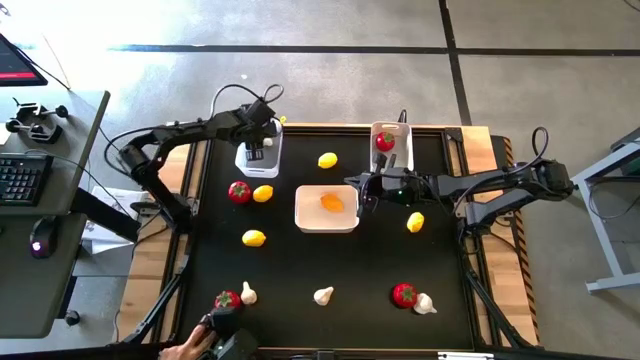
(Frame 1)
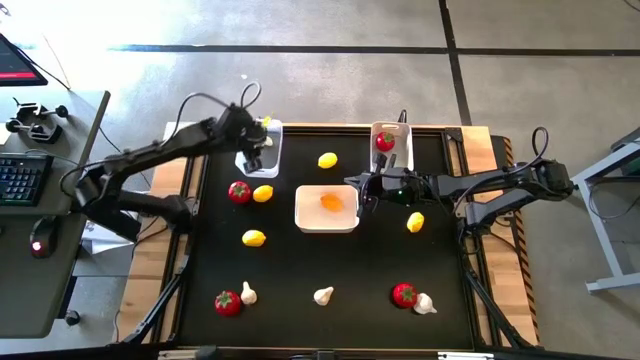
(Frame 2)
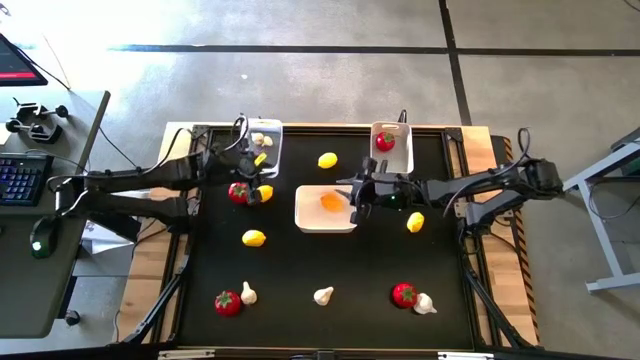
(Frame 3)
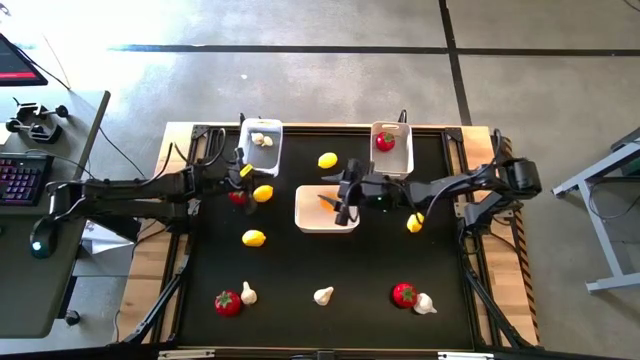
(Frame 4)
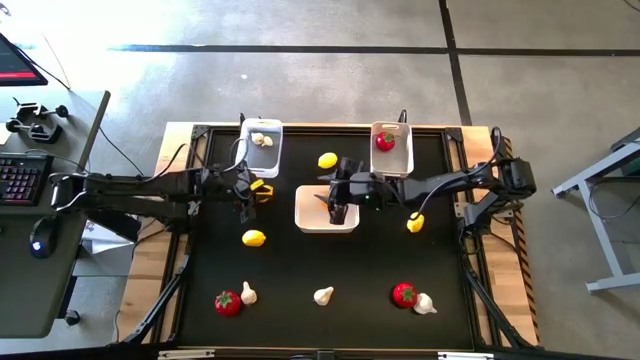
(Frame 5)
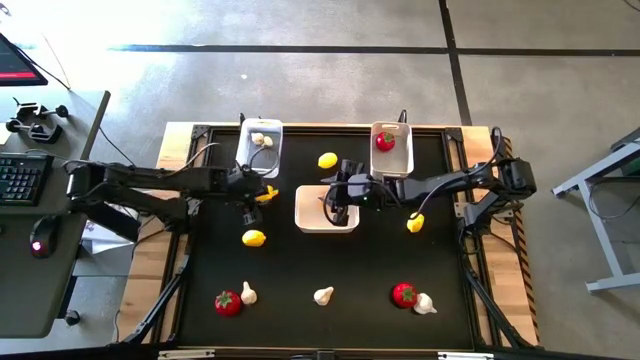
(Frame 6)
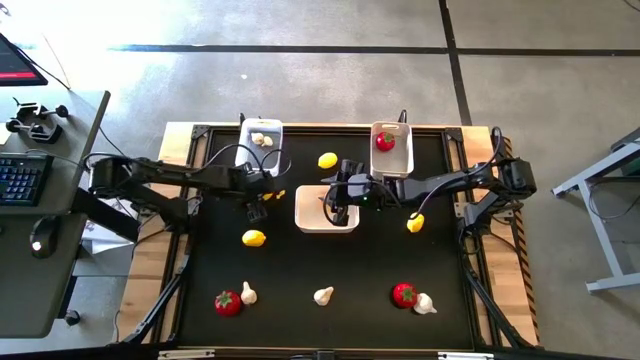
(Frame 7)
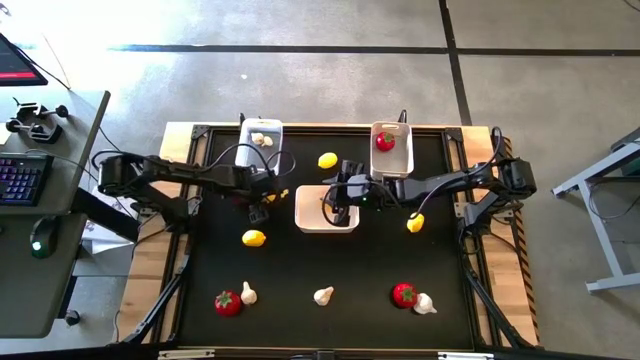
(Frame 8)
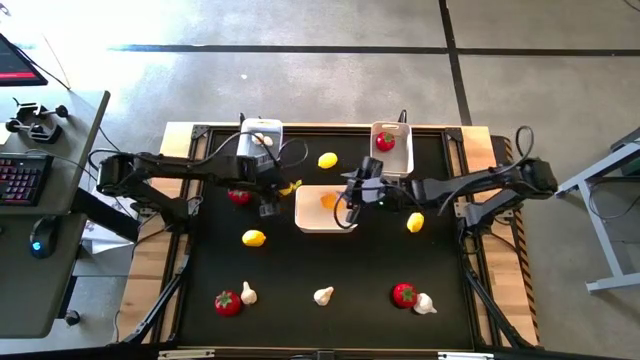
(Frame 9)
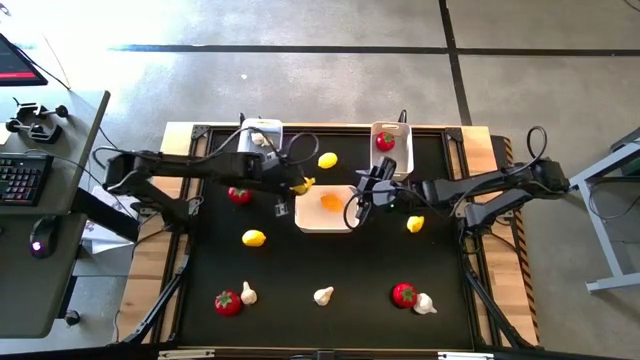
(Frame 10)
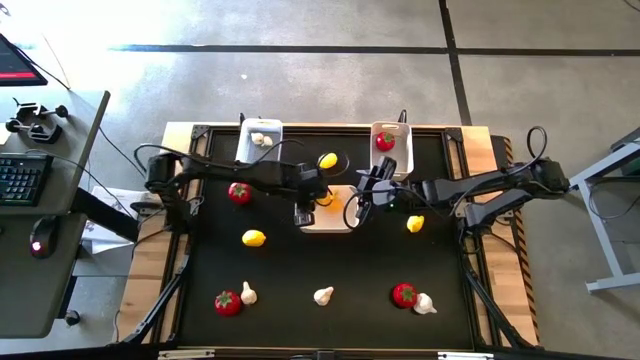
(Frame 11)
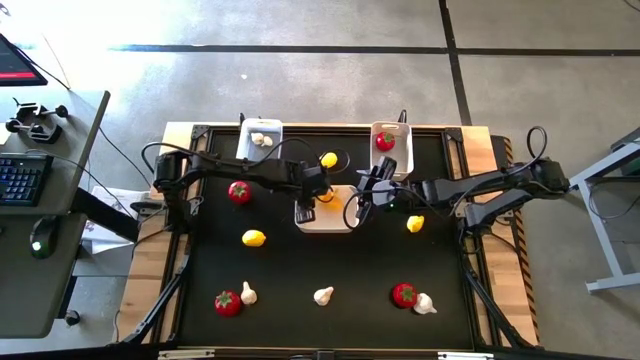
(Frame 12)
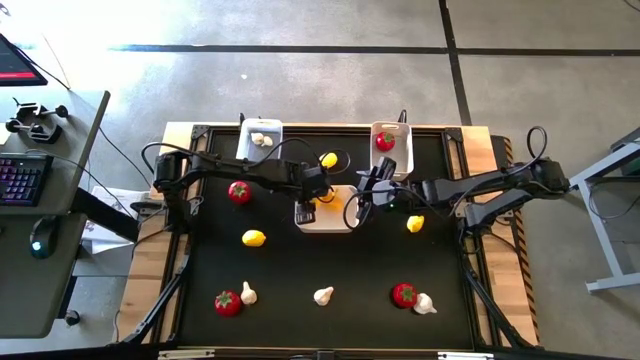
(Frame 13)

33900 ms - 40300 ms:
Task: Sort produce into baskets
Put the yellow lemon into the white bin

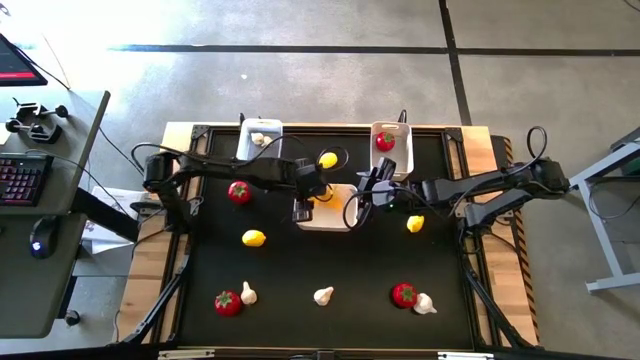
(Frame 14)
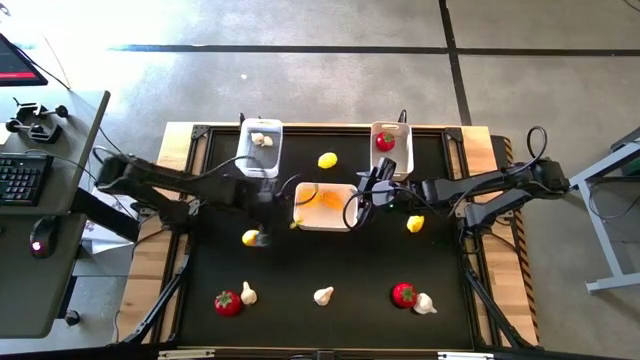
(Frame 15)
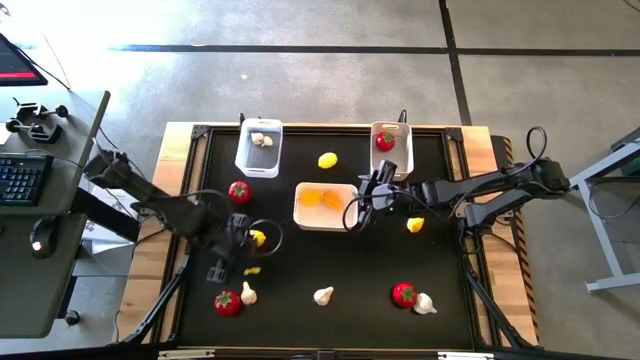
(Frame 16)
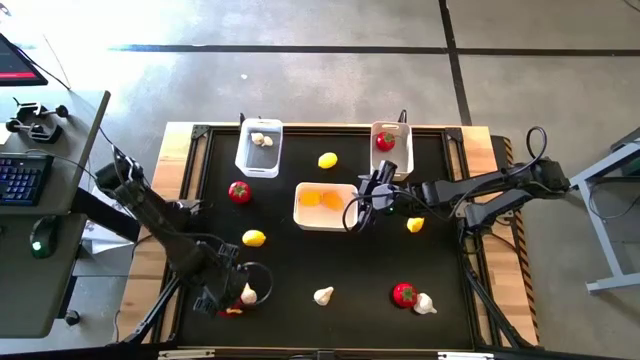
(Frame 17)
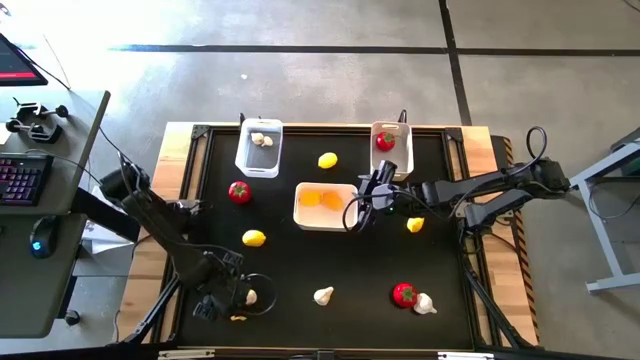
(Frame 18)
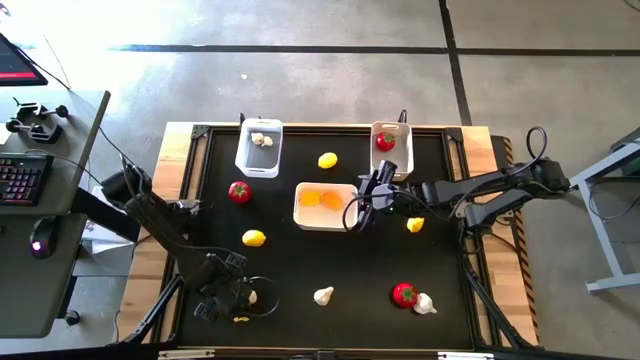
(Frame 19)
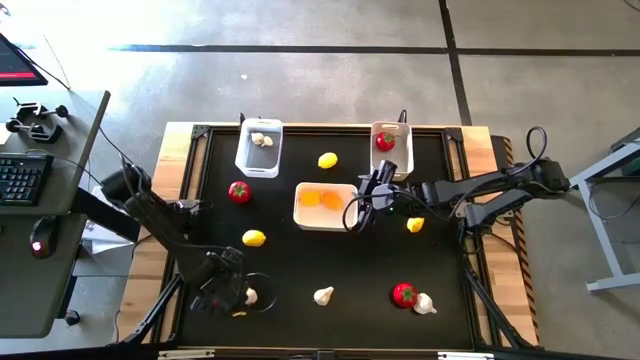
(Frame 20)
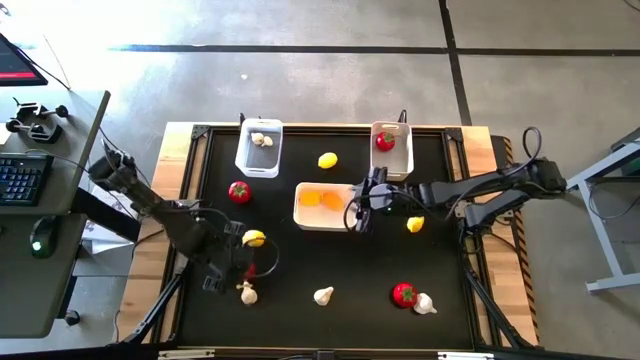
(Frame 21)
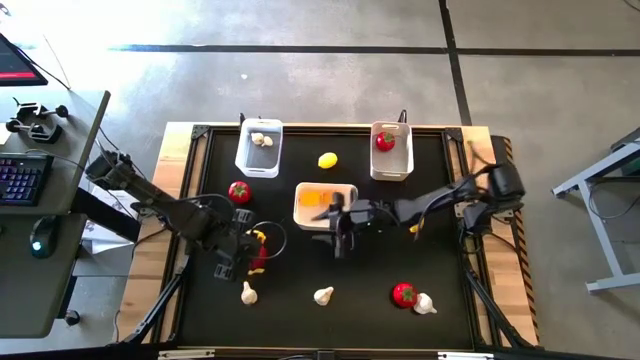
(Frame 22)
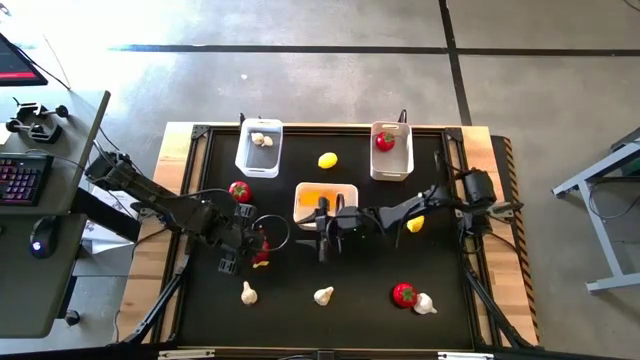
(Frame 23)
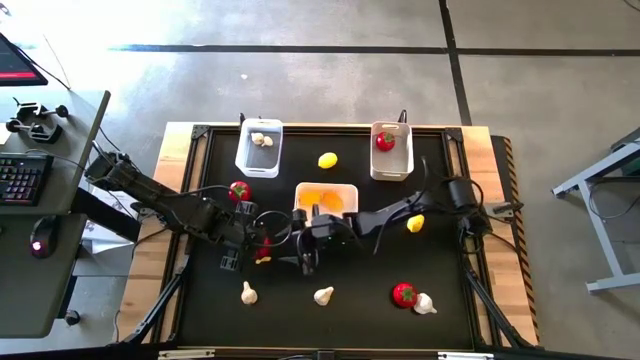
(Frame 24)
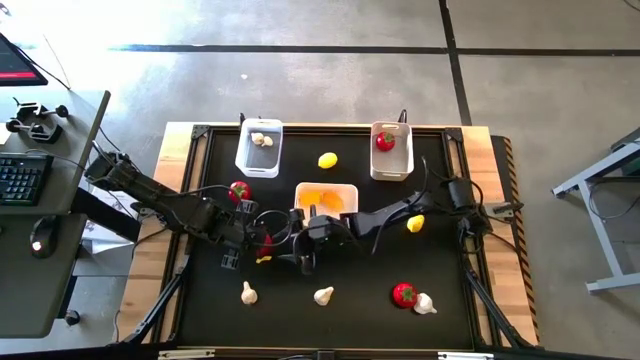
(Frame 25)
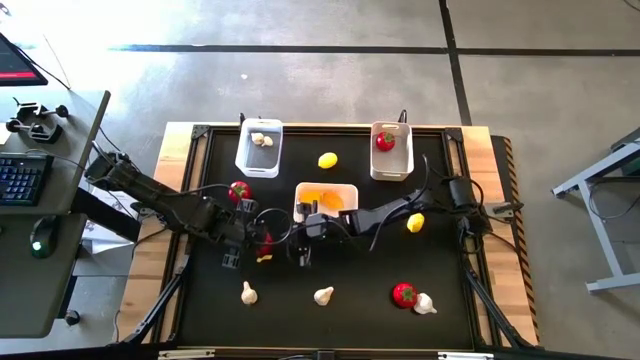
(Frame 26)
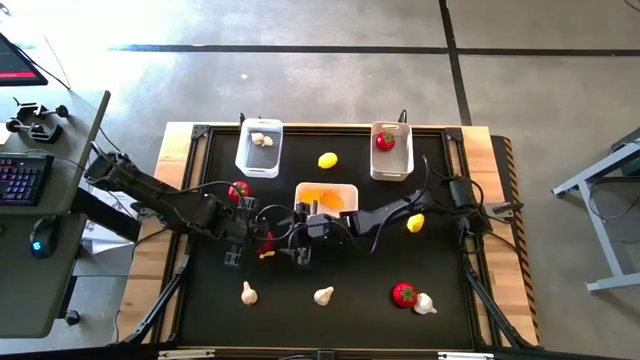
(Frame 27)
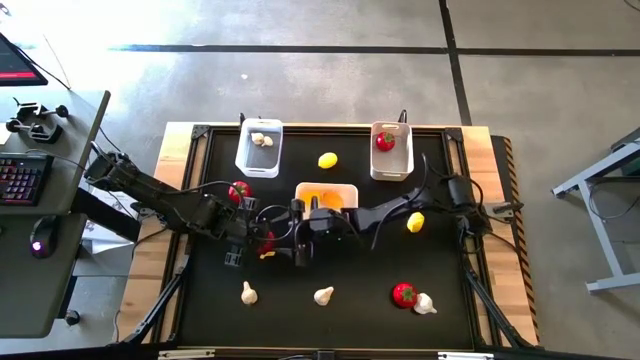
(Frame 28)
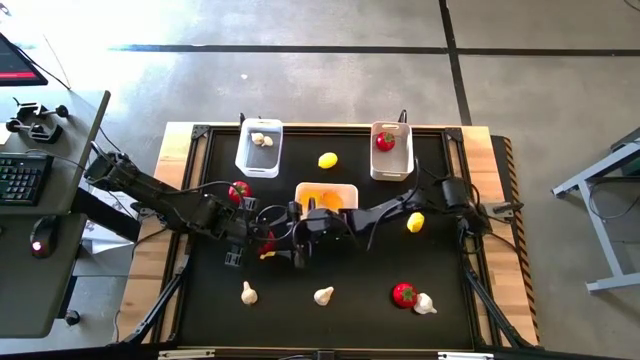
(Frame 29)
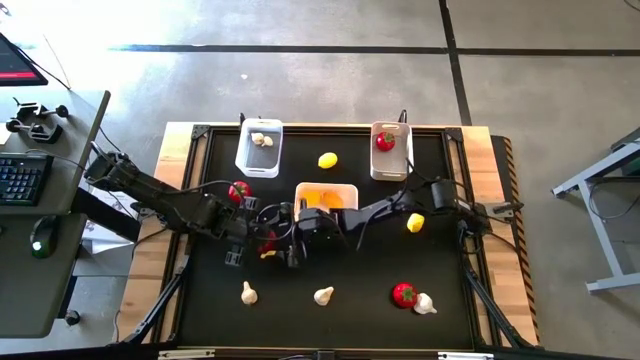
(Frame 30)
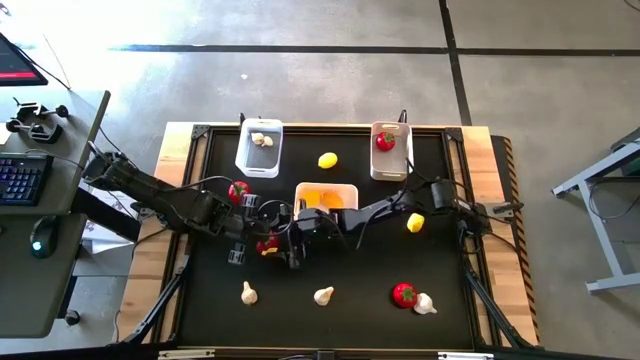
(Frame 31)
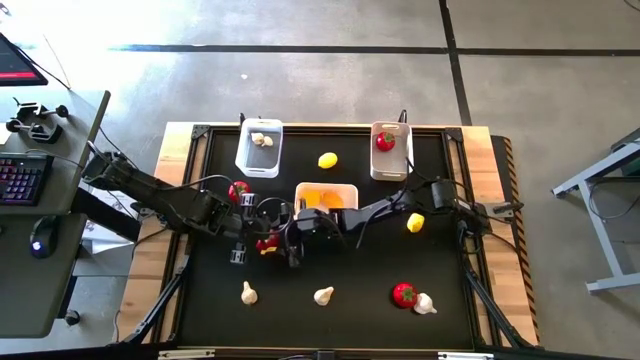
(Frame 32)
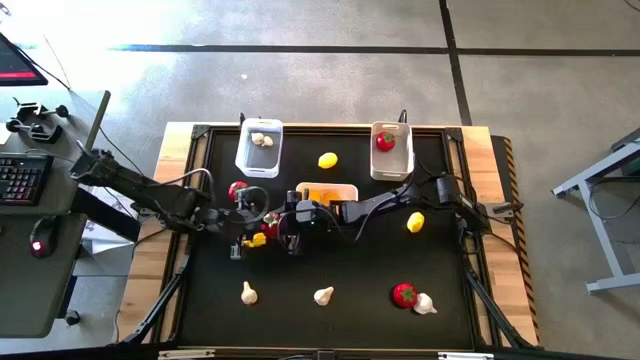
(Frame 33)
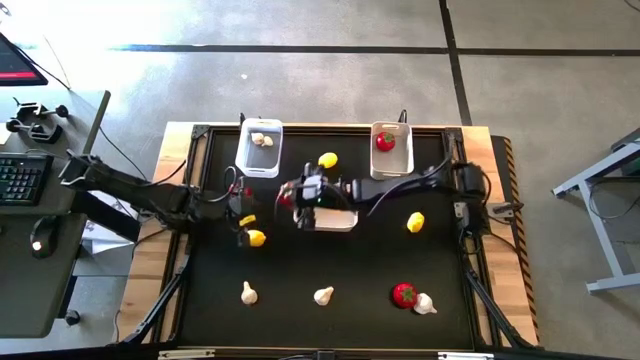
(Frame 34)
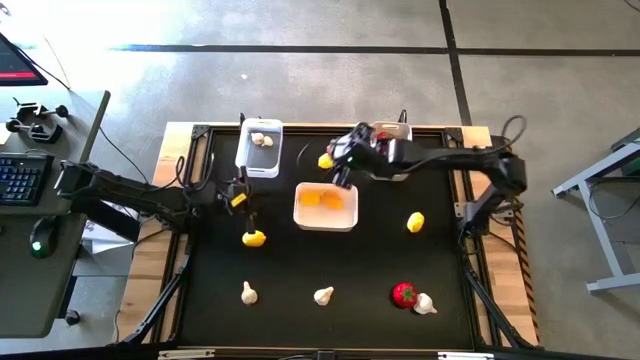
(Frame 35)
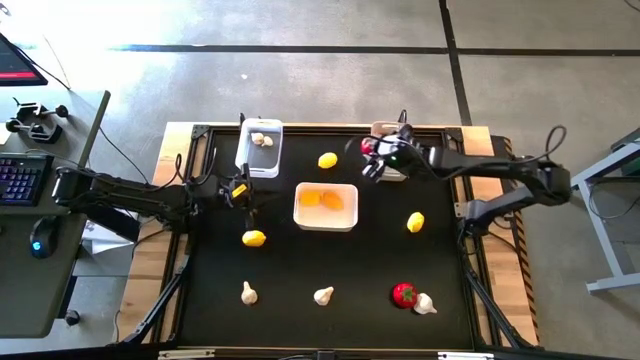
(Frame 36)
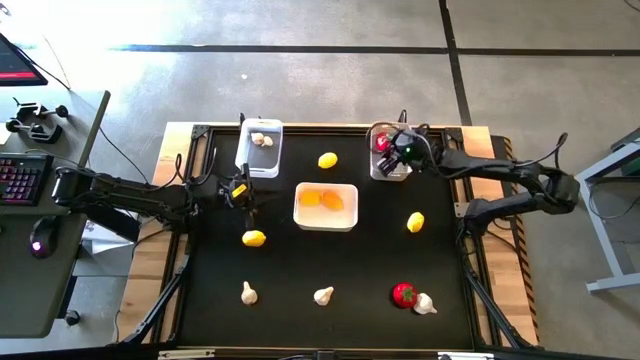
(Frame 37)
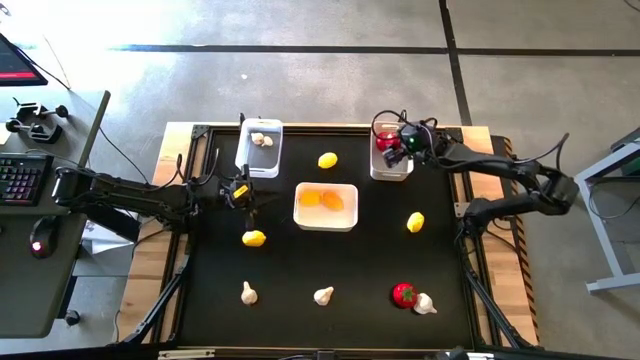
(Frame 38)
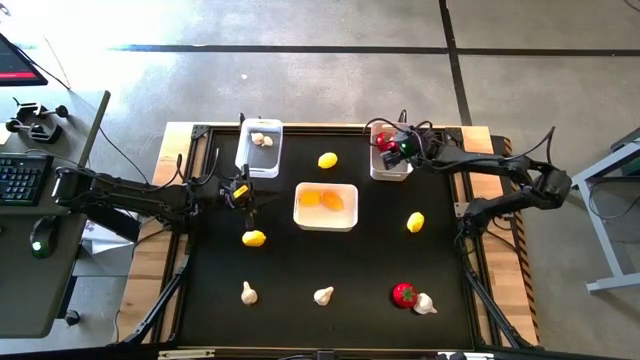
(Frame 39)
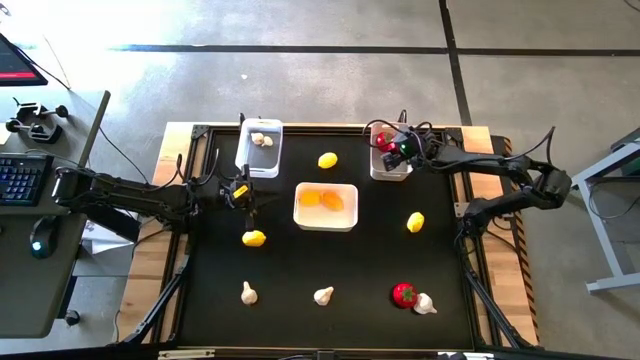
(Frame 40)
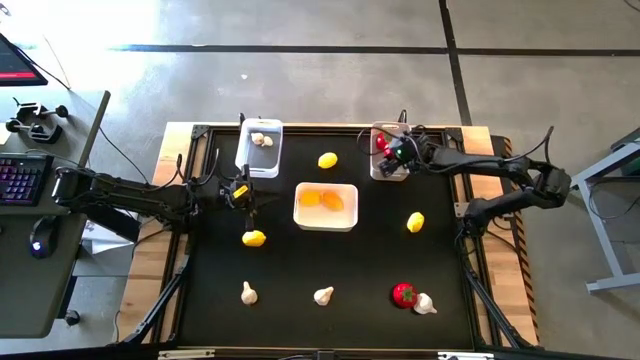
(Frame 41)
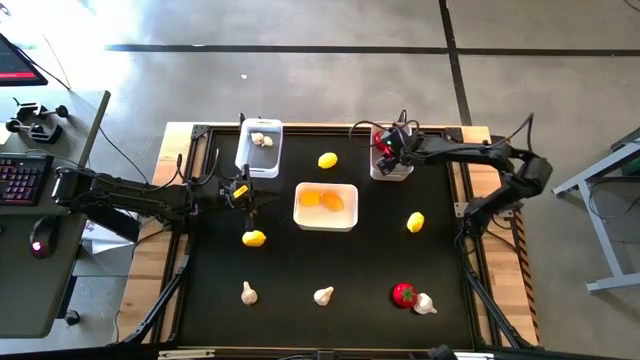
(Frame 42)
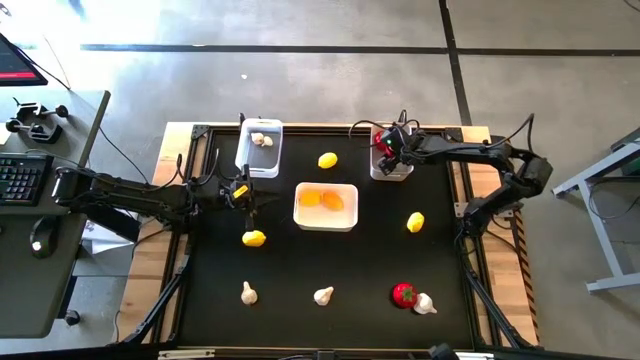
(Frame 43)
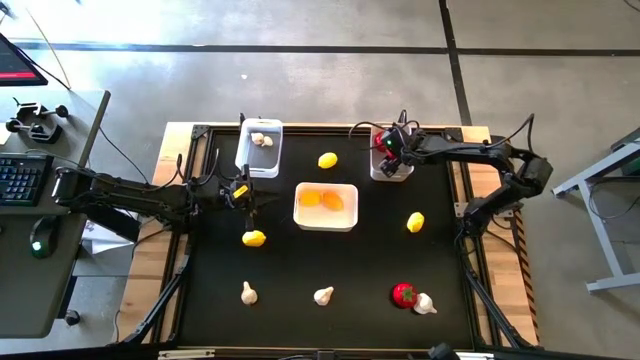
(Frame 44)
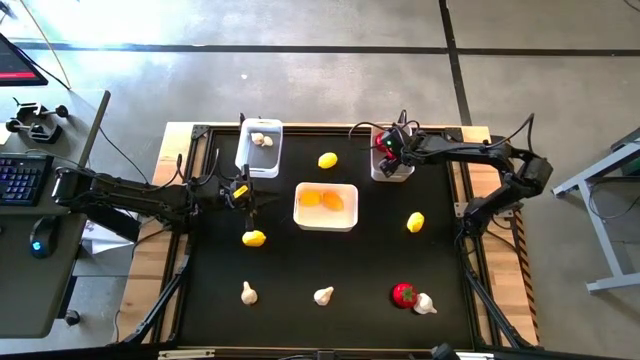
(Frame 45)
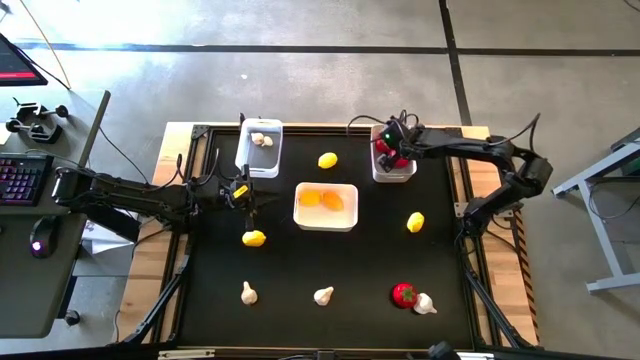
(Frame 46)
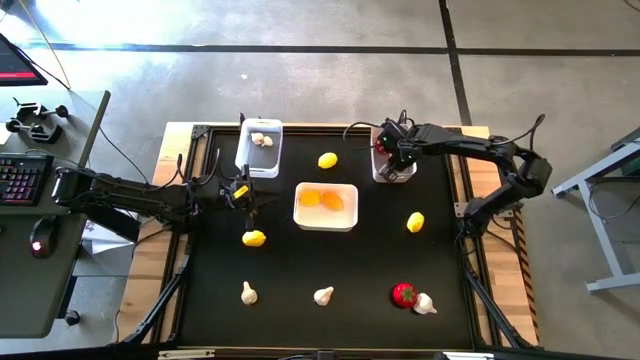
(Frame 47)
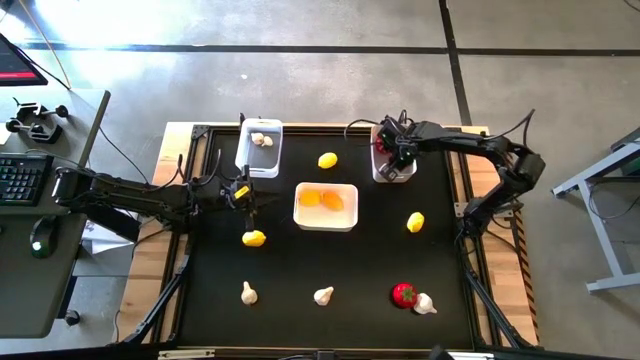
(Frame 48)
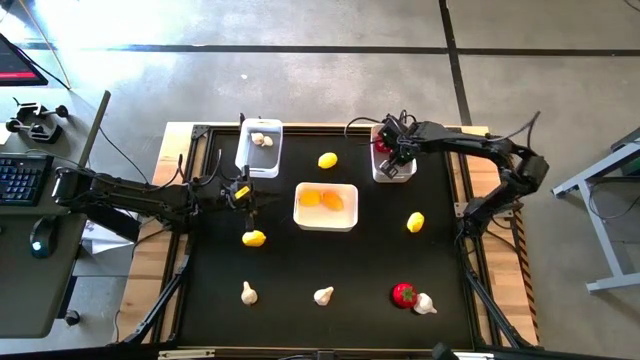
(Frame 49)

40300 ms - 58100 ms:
Put the red tomato into the gray bin
